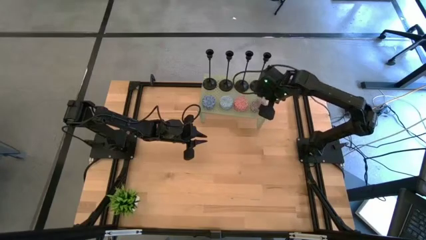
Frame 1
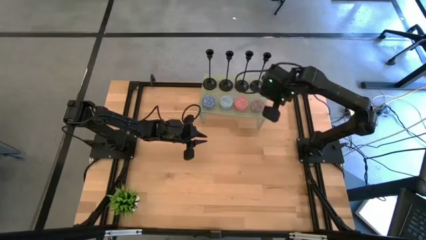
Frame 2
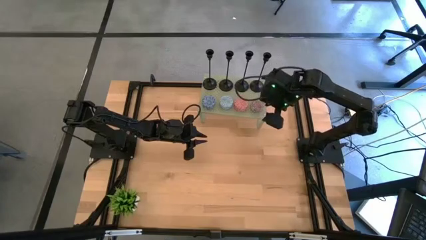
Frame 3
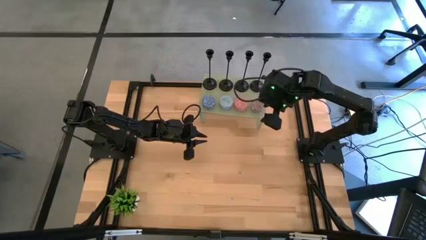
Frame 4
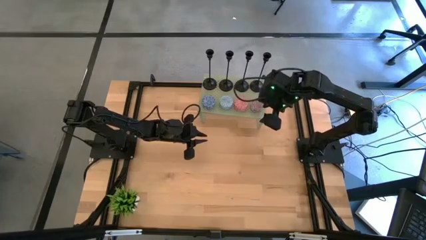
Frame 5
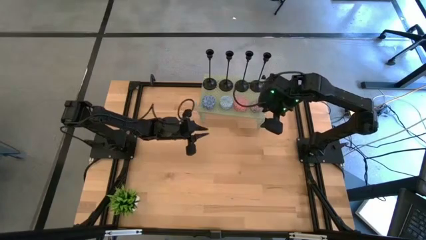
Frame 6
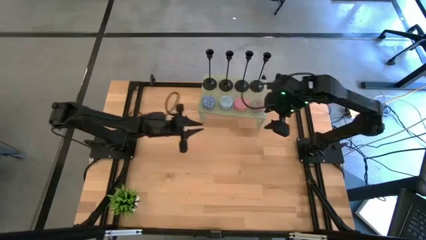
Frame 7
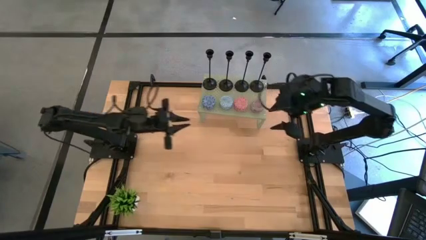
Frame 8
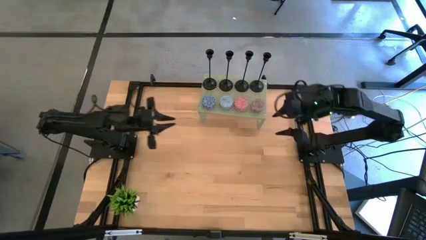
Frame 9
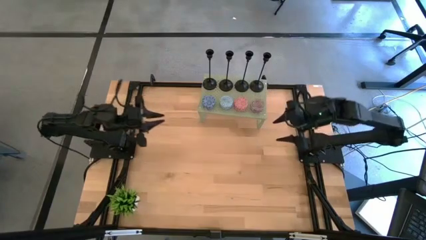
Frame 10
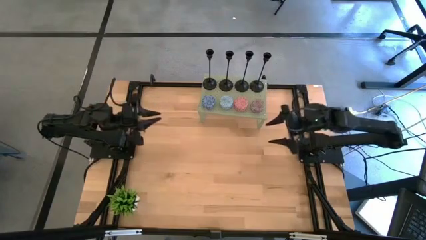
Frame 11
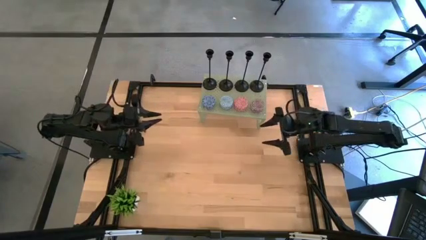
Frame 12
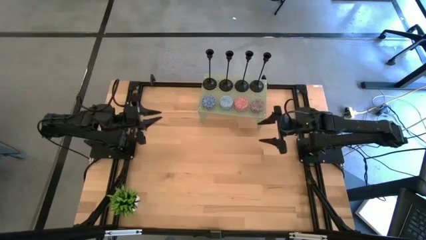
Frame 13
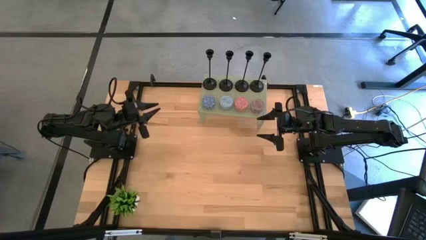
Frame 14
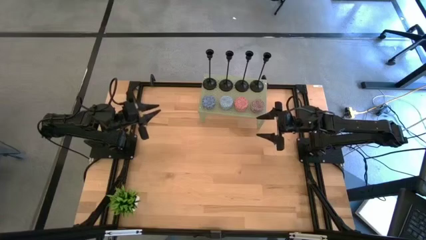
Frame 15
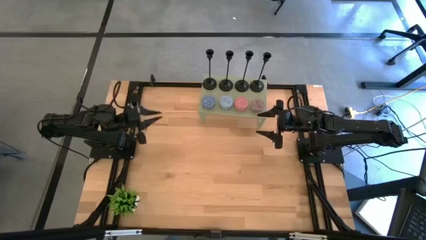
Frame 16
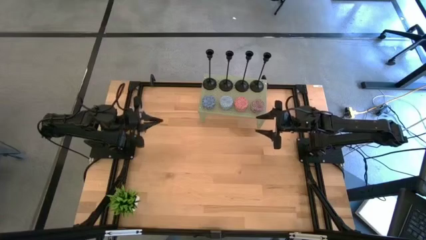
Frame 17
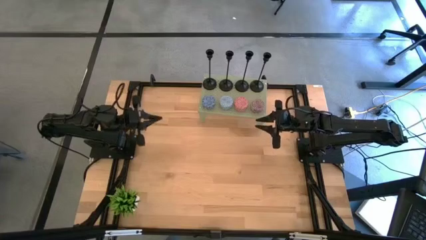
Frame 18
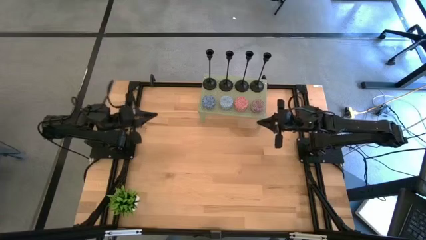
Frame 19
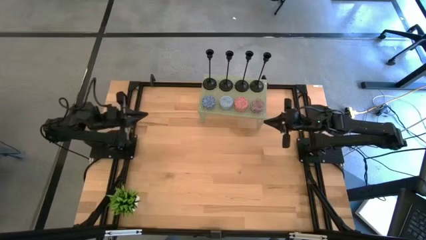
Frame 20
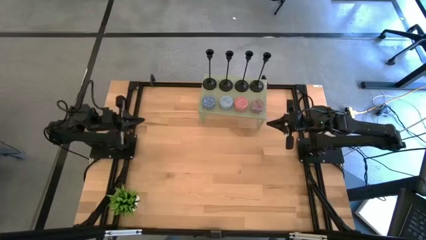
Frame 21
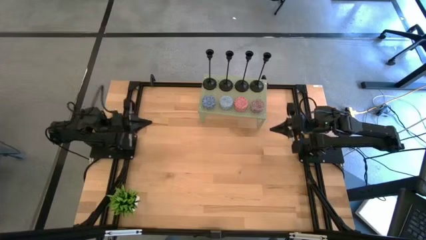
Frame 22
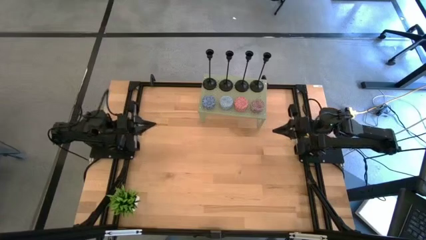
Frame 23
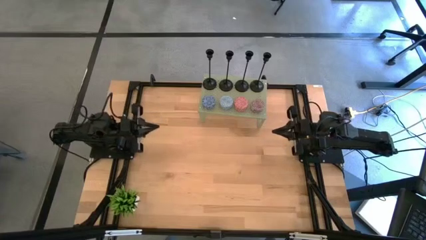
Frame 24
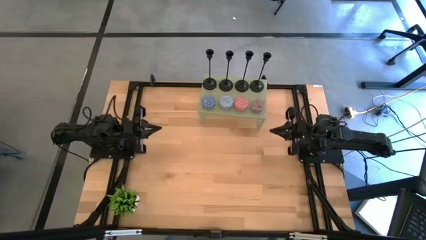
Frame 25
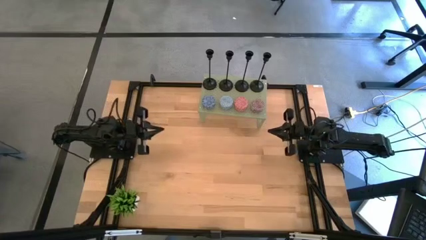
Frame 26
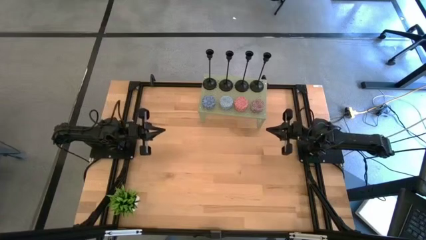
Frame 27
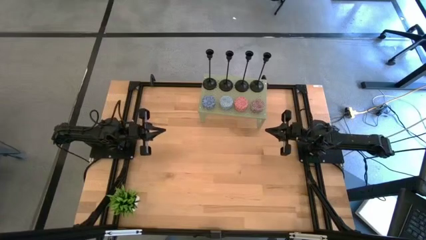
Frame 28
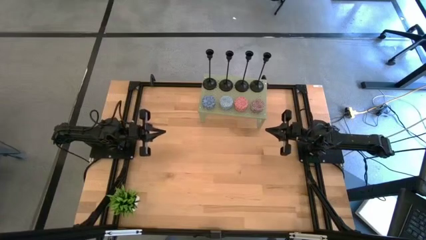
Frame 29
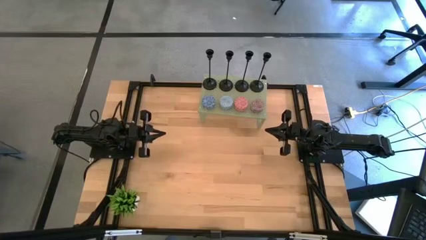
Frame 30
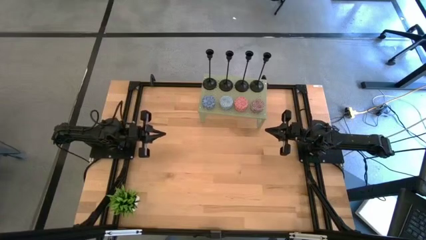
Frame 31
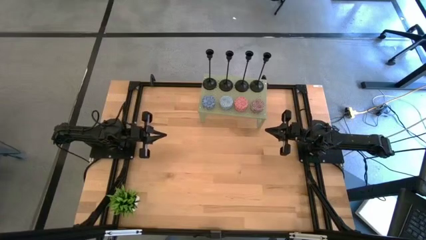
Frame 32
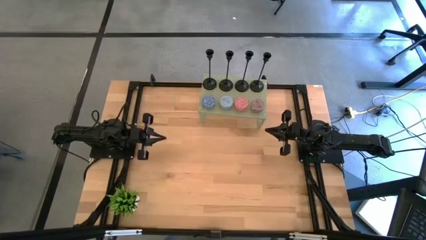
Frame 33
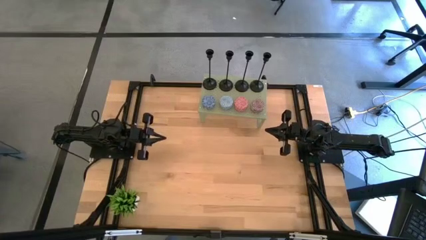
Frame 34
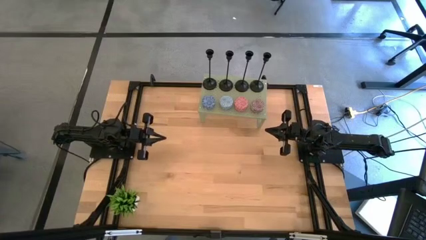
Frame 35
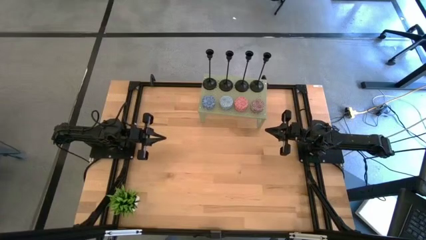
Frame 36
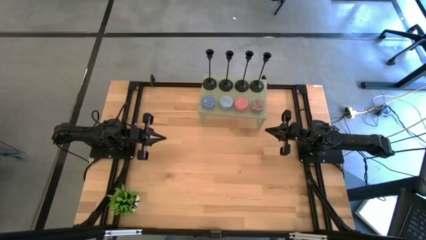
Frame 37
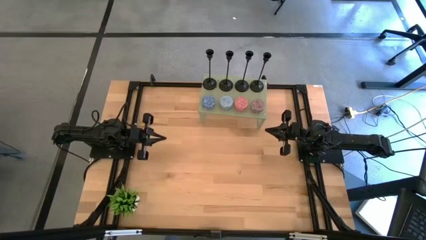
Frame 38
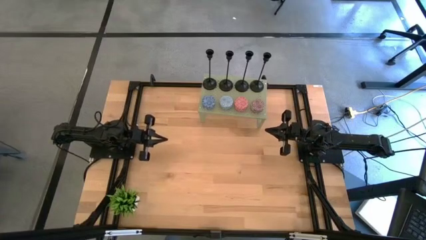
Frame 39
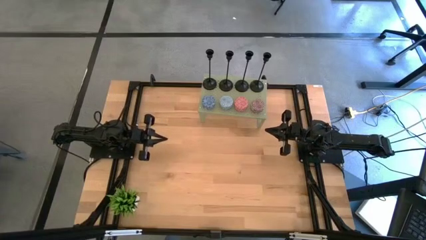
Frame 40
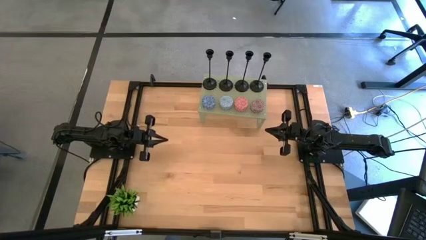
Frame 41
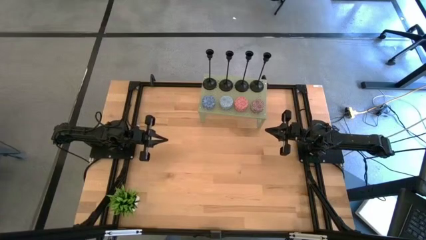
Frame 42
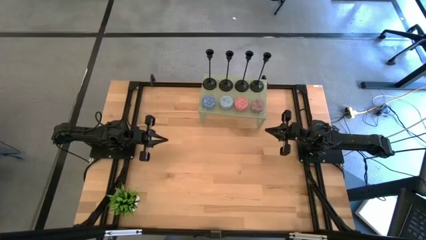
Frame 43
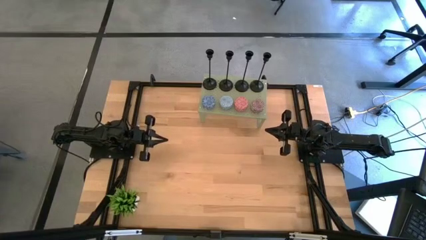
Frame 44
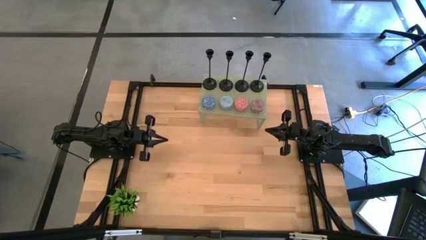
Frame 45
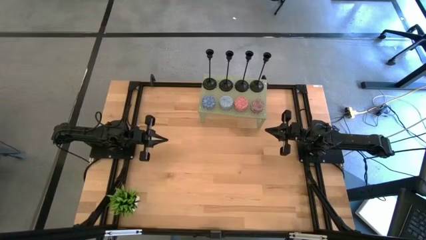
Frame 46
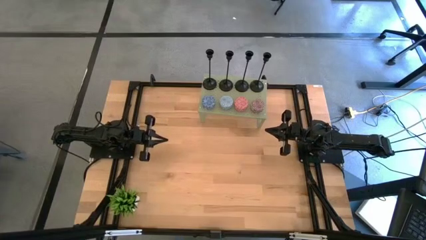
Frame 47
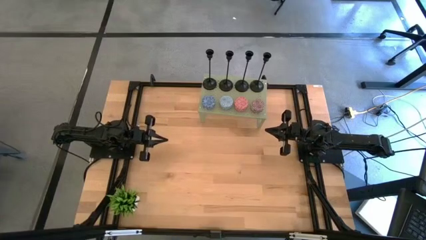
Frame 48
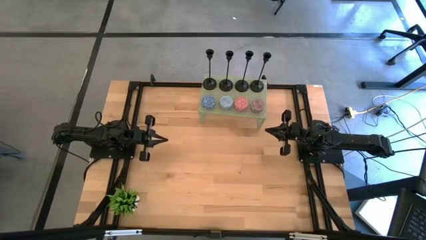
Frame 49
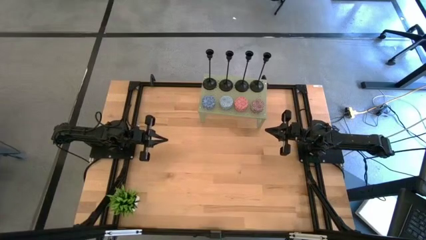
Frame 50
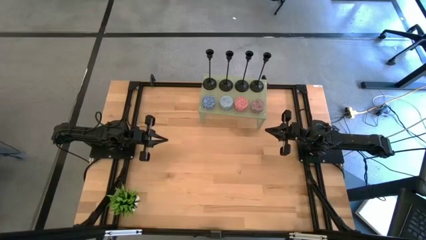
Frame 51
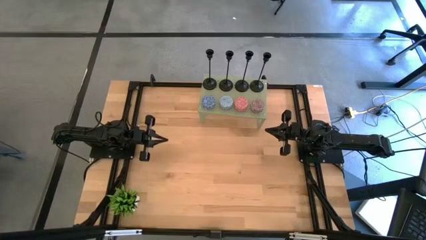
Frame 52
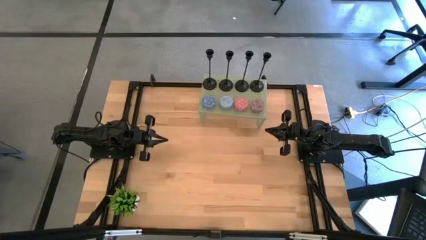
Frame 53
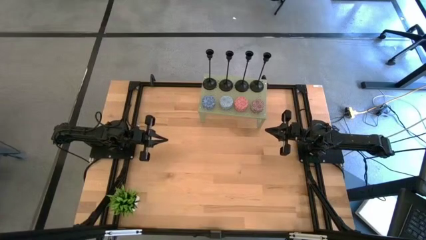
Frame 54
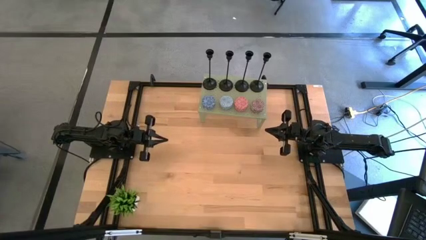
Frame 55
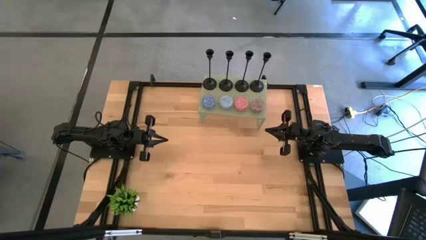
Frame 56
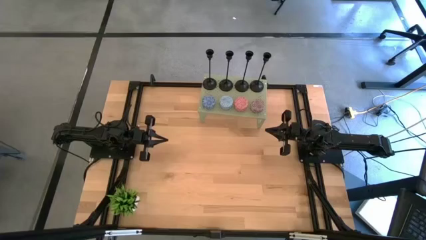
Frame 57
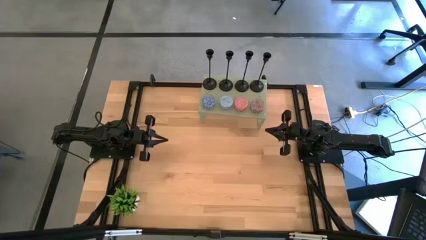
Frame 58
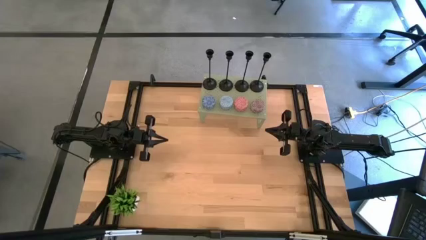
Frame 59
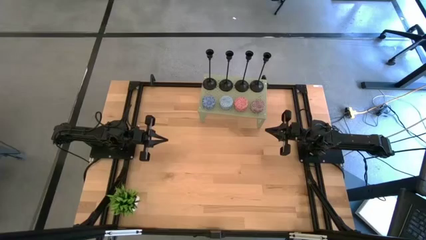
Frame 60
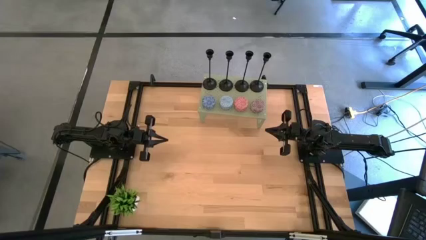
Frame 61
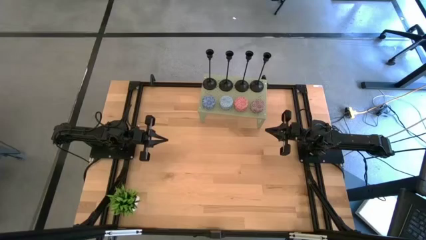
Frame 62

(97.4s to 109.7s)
Task: Pick & Place candle stick holders
Return to Home Position

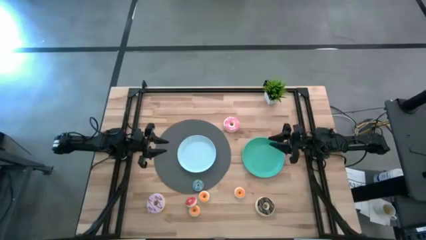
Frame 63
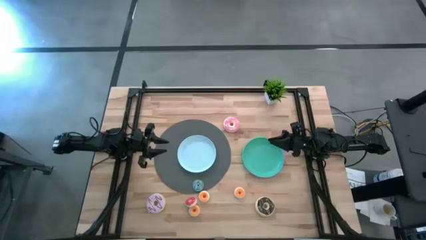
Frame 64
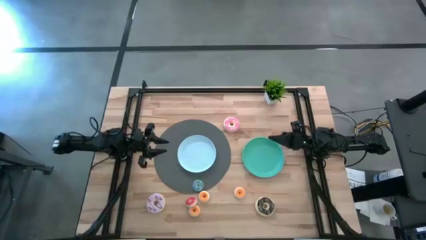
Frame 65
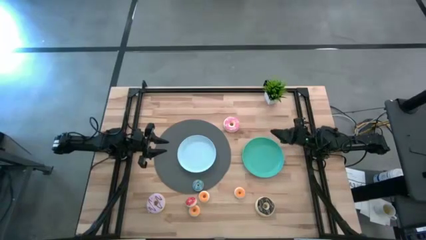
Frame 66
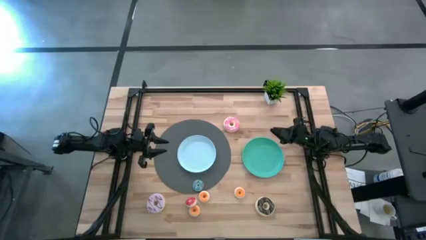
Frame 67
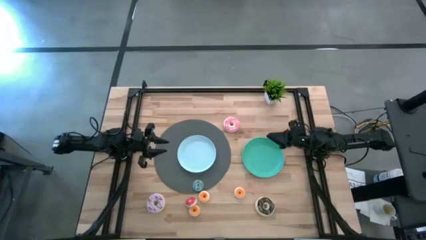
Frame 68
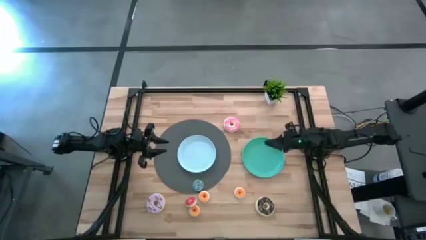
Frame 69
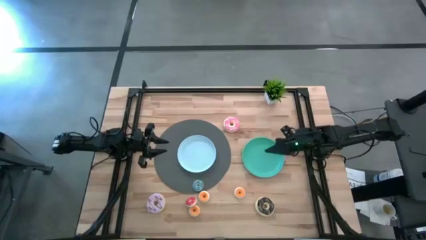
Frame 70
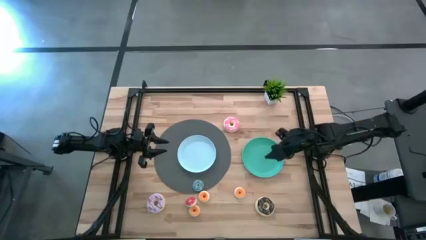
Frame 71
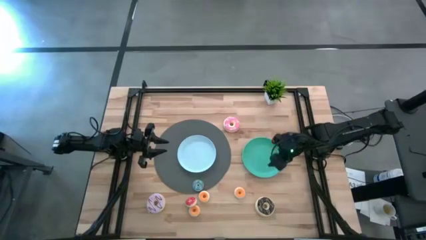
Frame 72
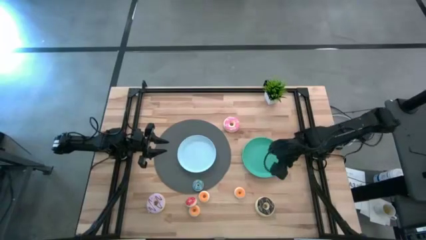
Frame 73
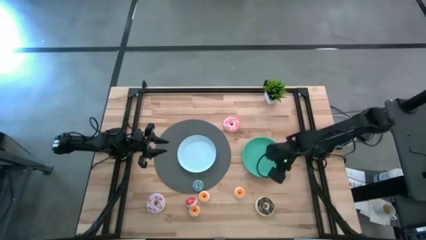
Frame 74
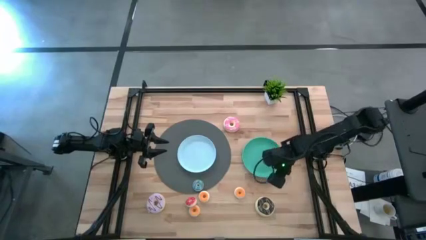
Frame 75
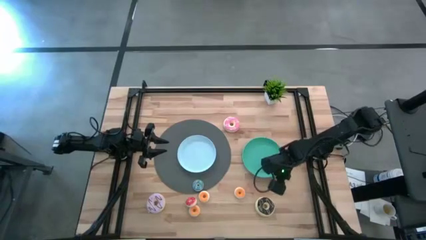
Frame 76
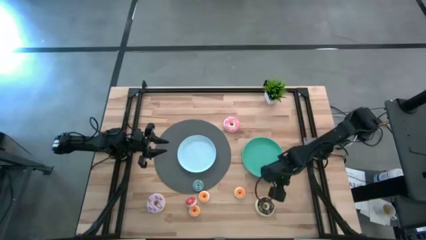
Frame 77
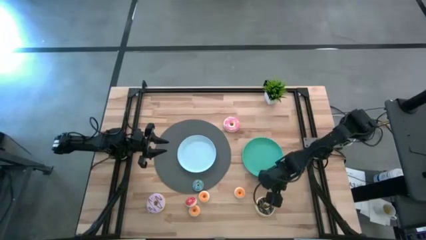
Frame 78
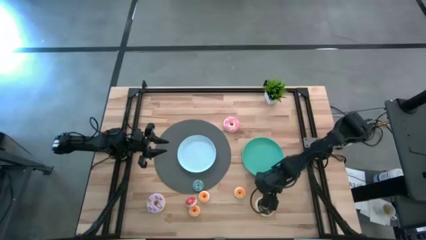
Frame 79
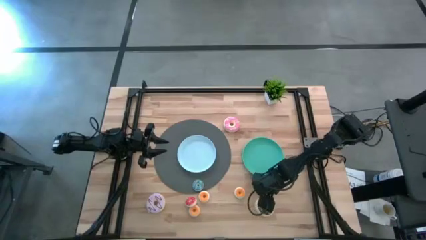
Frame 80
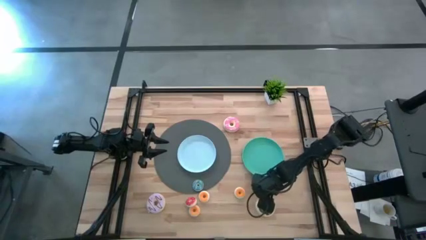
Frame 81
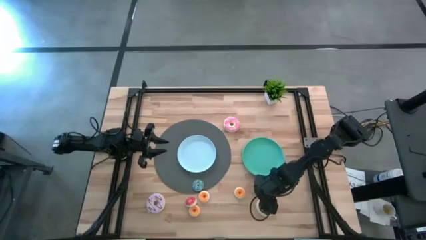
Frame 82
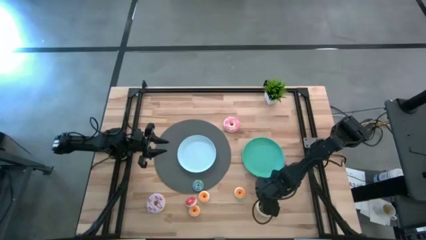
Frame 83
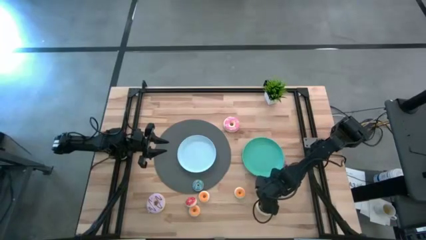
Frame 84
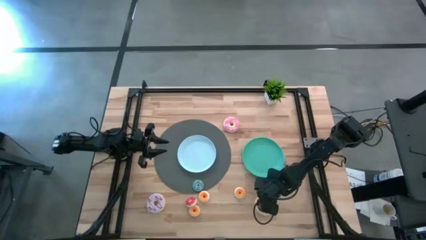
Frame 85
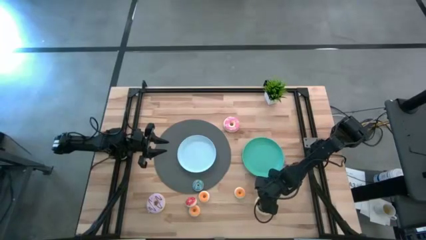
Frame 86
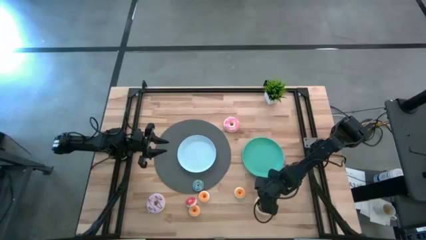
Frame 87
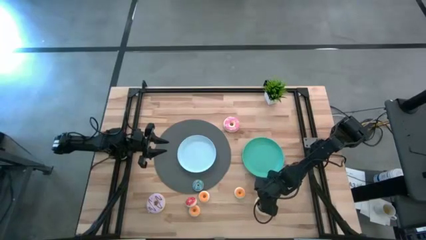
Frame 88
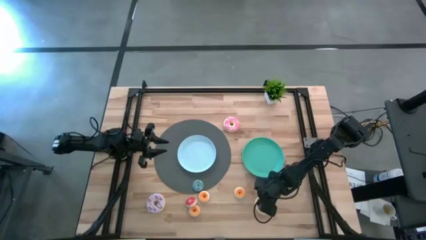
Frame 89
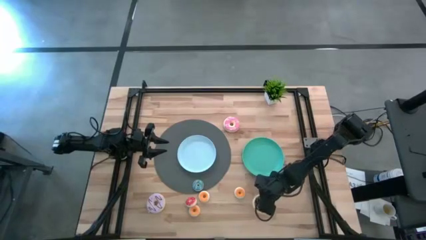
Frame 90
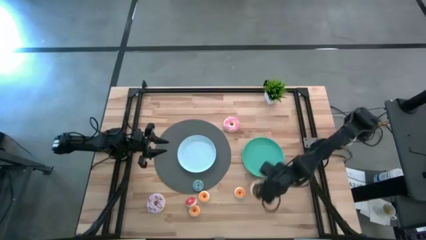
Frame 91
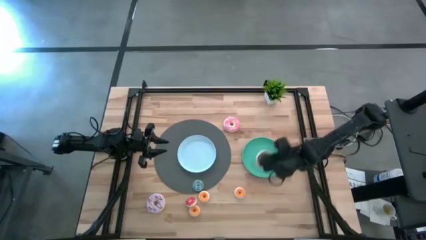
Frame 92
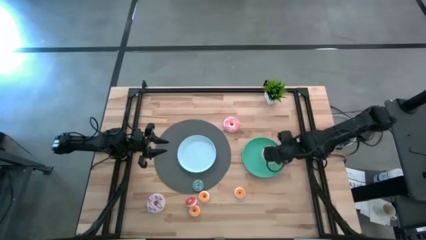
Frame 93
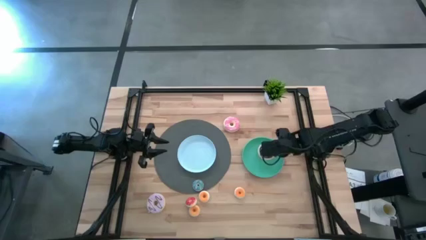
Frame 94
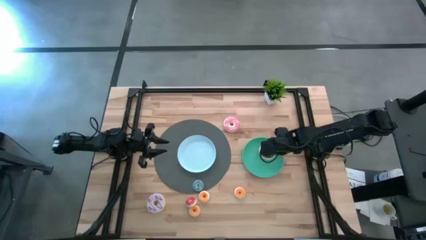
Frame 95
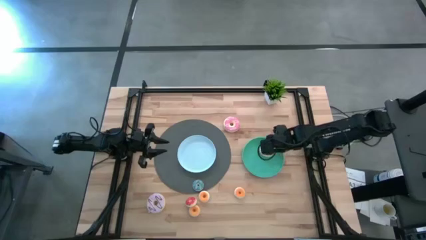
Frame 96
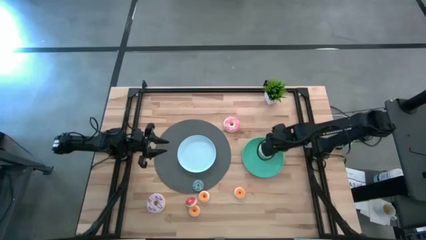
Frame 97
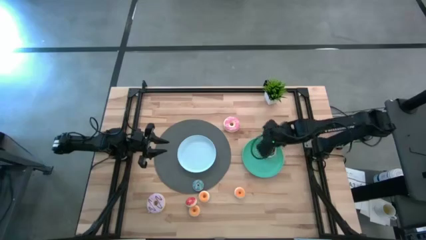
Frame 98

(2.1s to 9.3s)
Task: Pick & Place donuts
Put the big black donut on the blue and green plate
